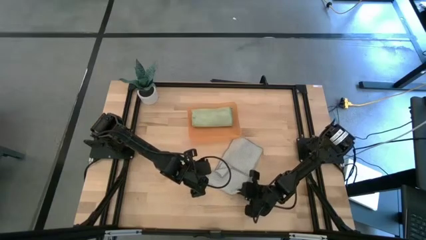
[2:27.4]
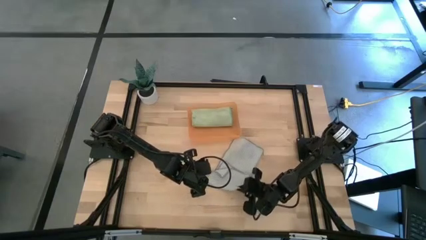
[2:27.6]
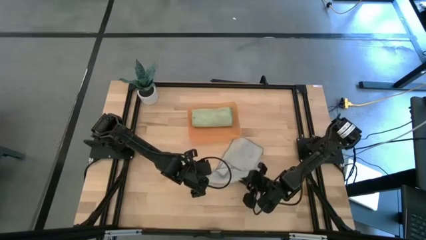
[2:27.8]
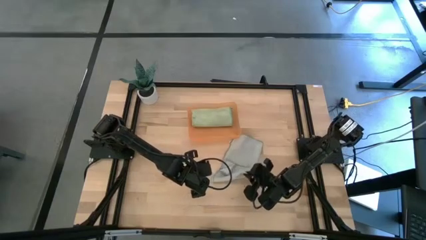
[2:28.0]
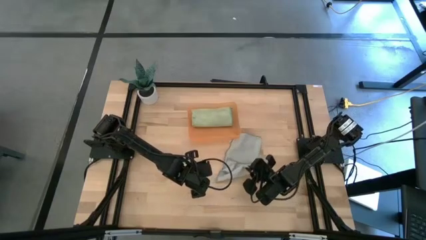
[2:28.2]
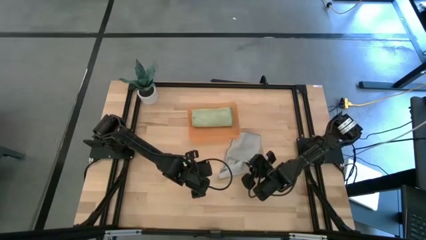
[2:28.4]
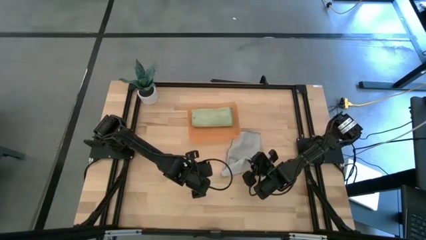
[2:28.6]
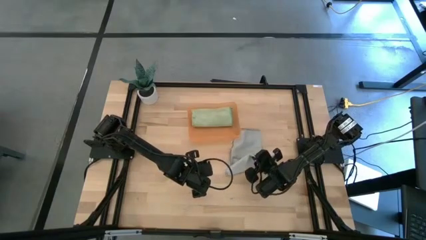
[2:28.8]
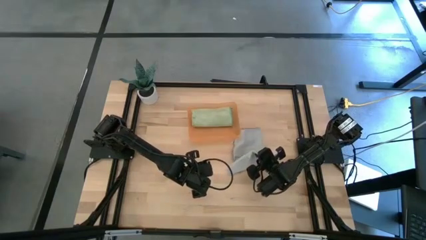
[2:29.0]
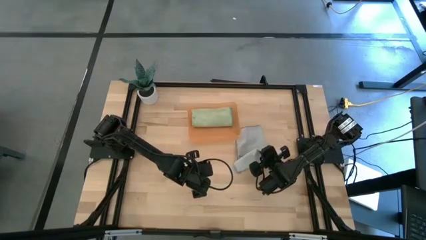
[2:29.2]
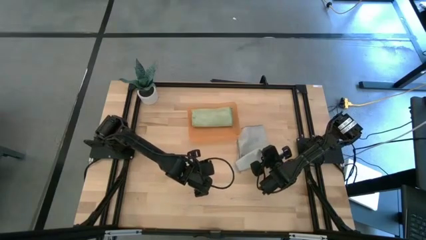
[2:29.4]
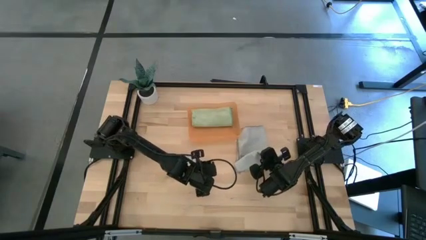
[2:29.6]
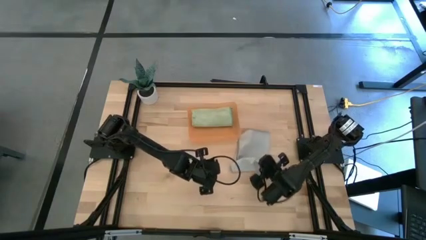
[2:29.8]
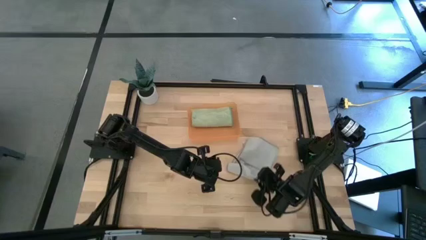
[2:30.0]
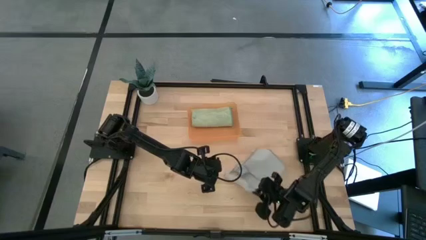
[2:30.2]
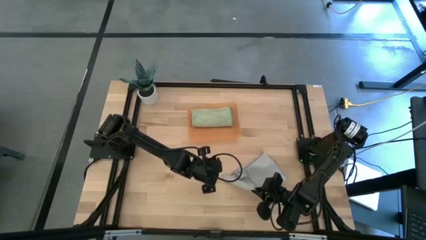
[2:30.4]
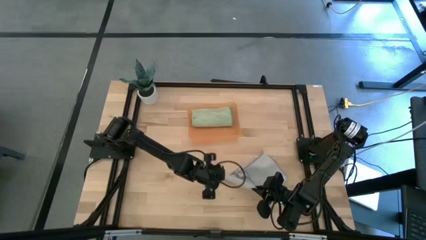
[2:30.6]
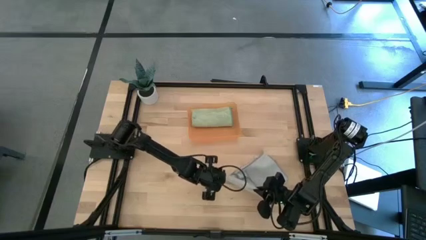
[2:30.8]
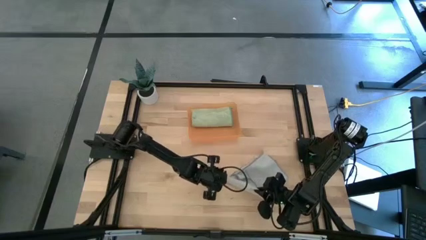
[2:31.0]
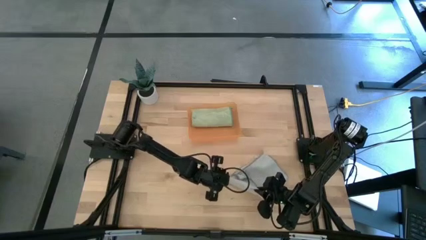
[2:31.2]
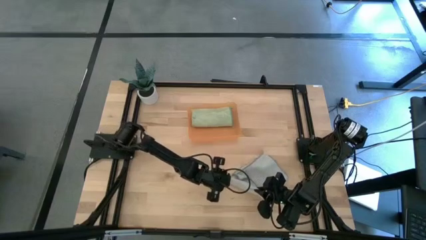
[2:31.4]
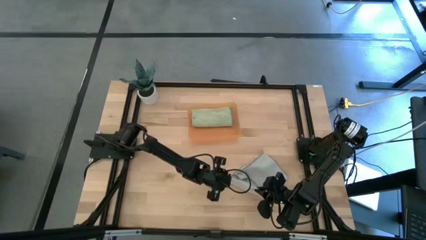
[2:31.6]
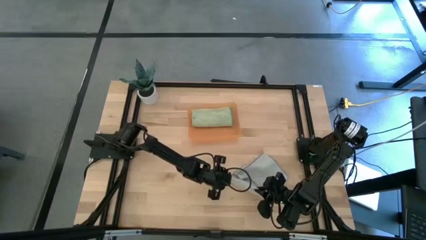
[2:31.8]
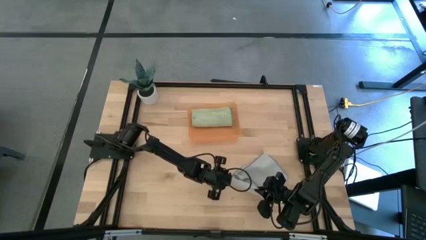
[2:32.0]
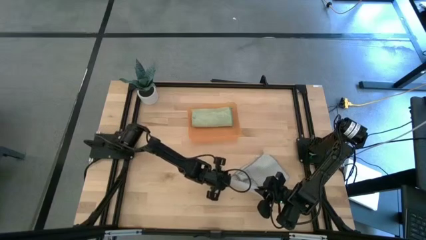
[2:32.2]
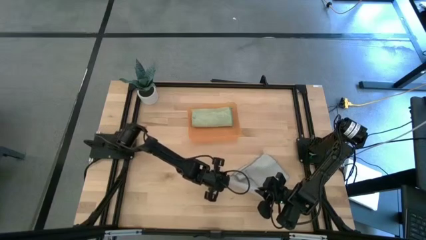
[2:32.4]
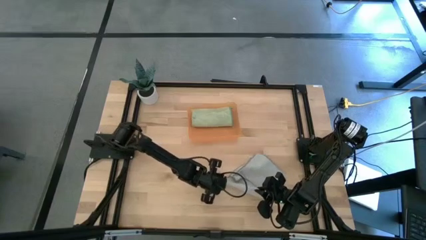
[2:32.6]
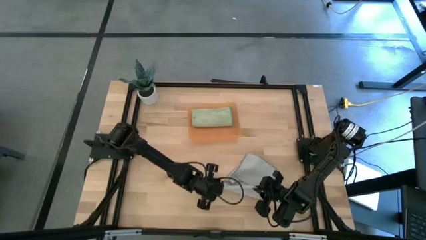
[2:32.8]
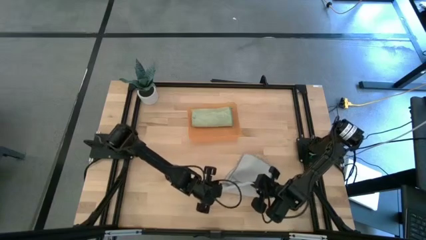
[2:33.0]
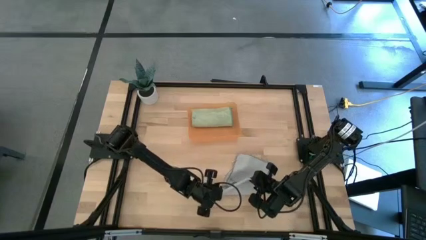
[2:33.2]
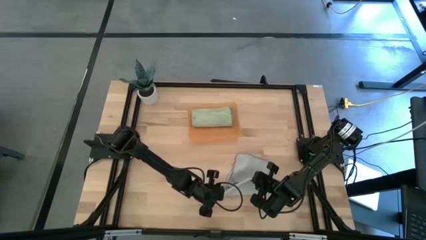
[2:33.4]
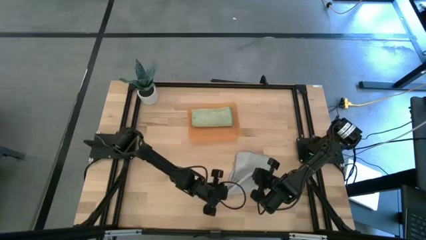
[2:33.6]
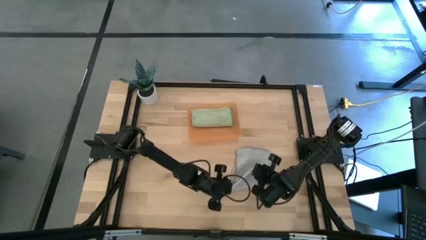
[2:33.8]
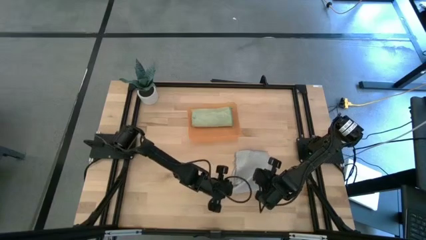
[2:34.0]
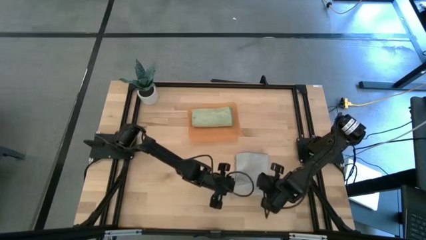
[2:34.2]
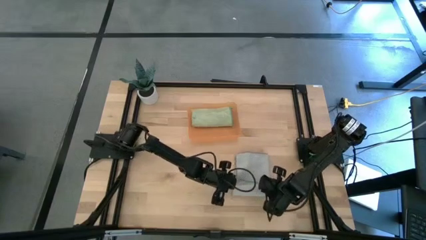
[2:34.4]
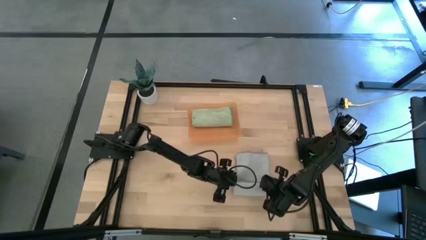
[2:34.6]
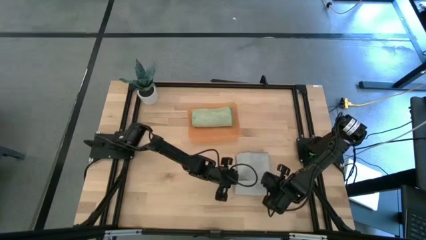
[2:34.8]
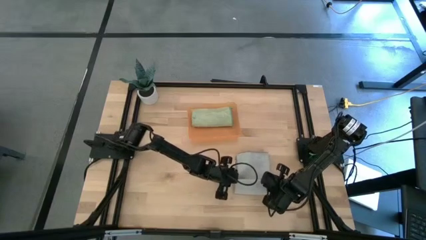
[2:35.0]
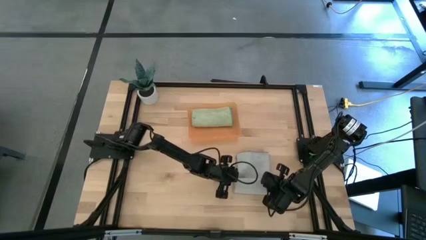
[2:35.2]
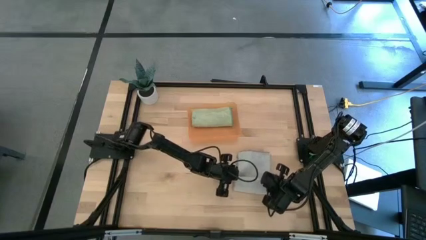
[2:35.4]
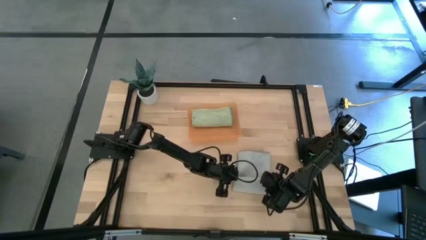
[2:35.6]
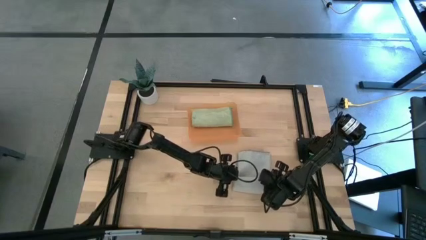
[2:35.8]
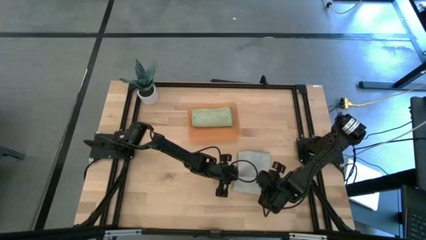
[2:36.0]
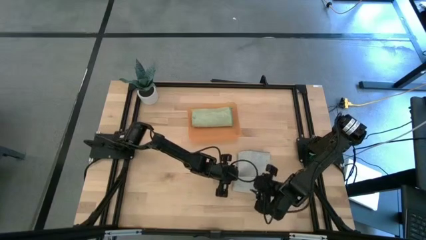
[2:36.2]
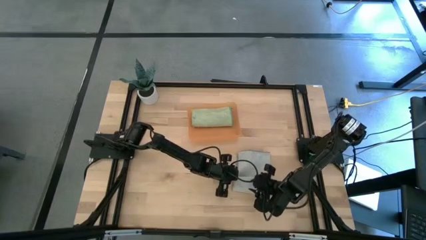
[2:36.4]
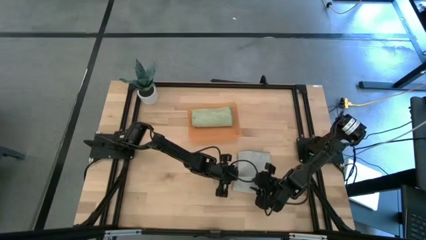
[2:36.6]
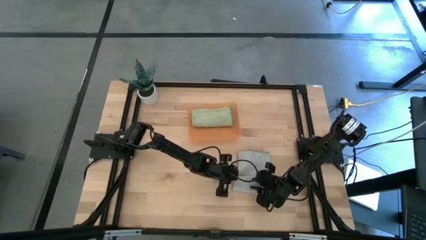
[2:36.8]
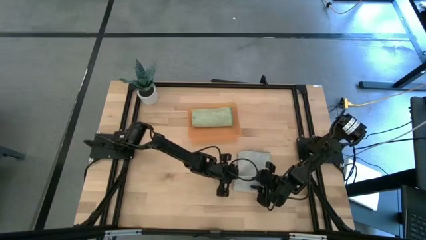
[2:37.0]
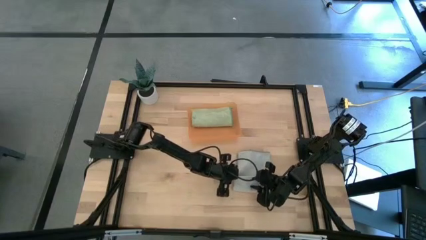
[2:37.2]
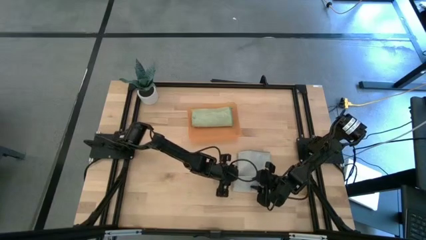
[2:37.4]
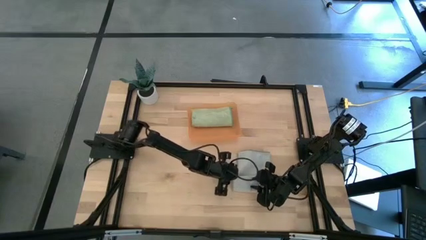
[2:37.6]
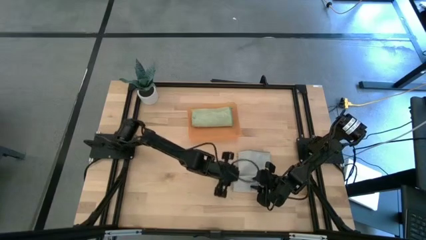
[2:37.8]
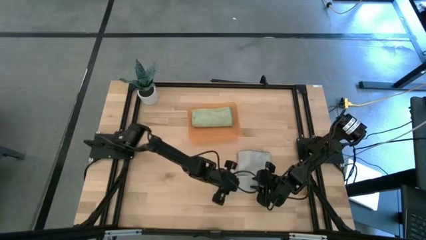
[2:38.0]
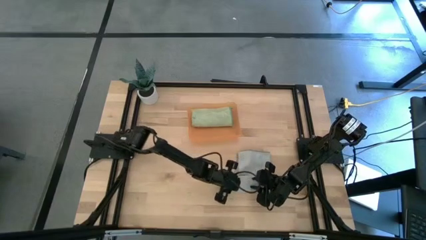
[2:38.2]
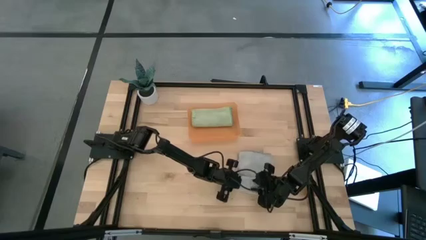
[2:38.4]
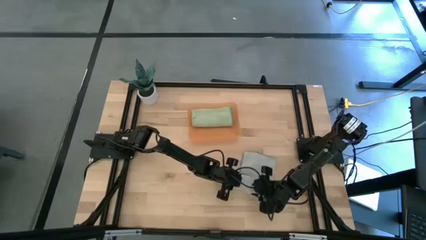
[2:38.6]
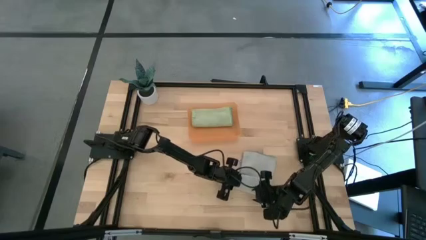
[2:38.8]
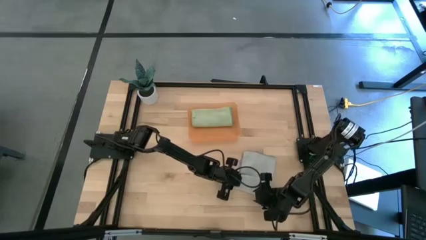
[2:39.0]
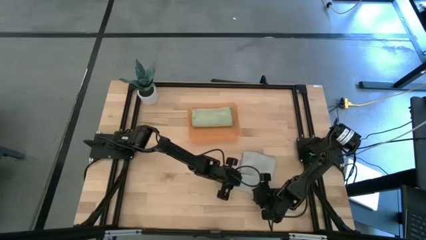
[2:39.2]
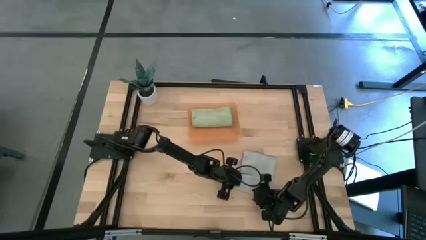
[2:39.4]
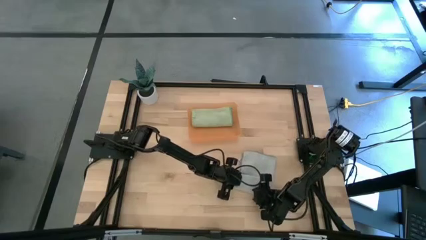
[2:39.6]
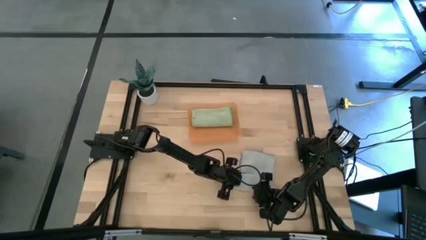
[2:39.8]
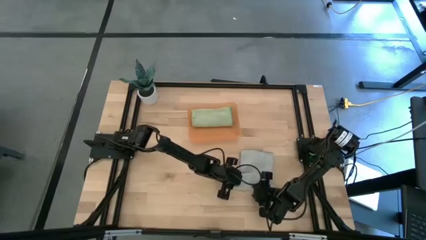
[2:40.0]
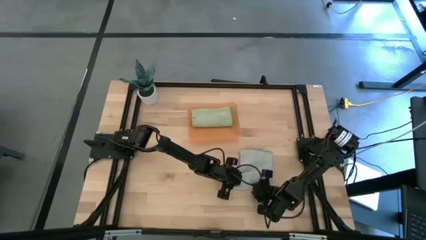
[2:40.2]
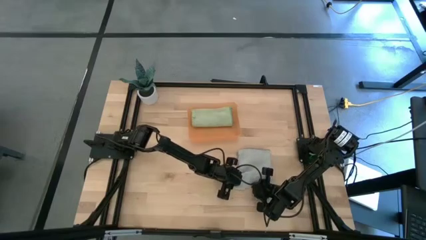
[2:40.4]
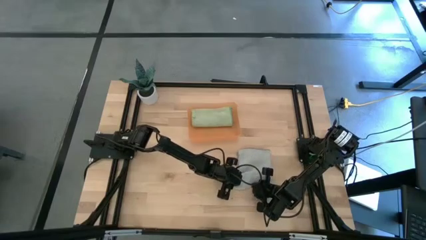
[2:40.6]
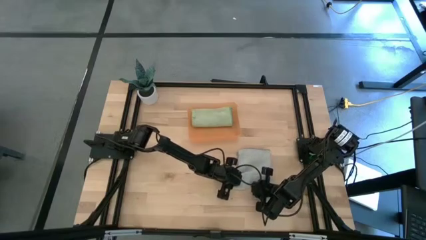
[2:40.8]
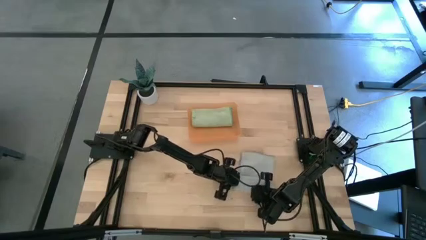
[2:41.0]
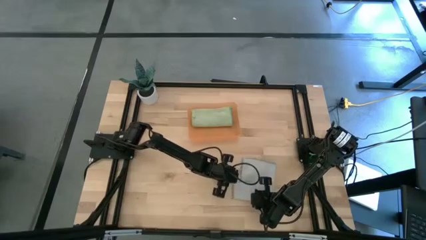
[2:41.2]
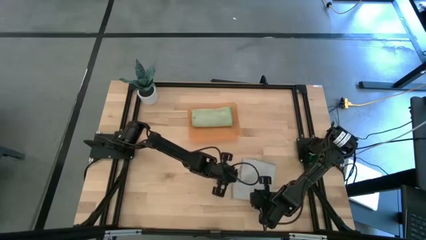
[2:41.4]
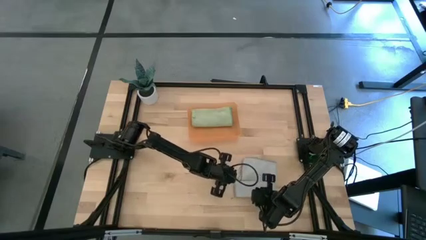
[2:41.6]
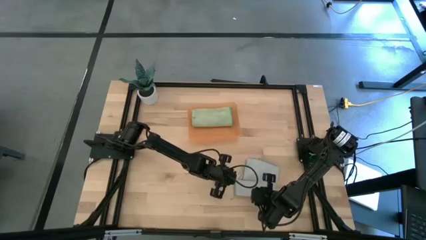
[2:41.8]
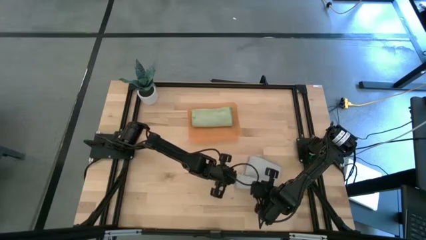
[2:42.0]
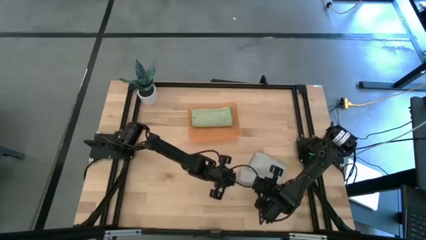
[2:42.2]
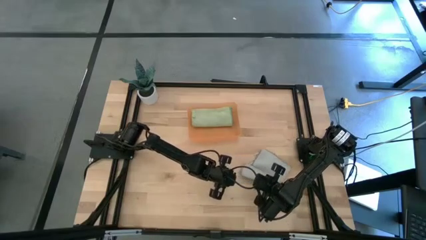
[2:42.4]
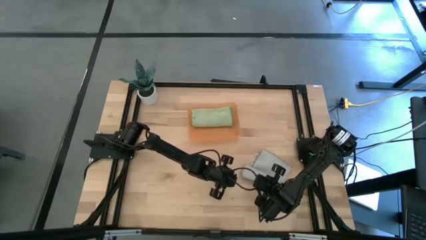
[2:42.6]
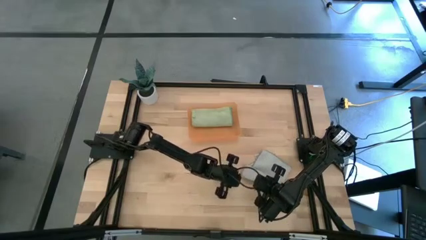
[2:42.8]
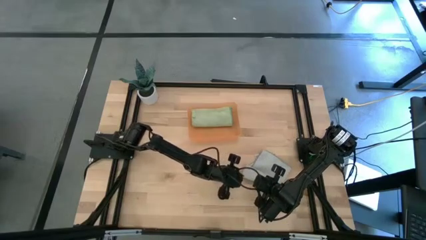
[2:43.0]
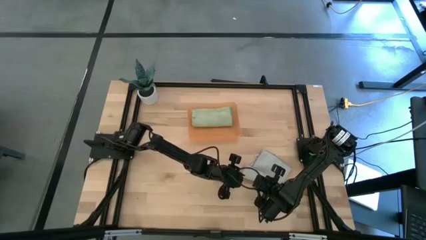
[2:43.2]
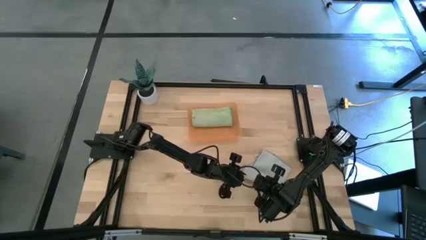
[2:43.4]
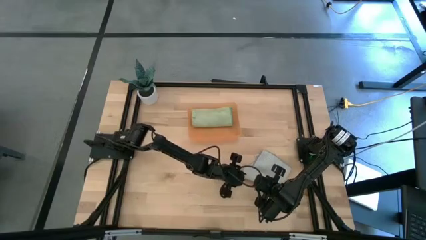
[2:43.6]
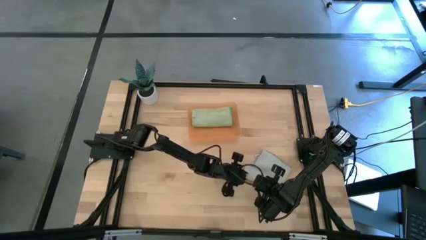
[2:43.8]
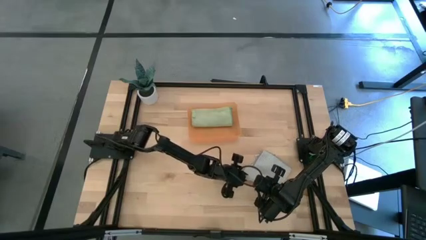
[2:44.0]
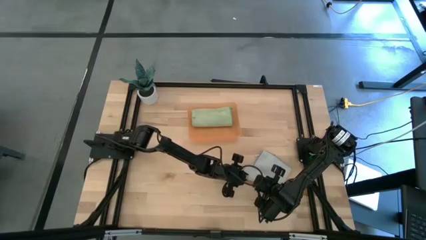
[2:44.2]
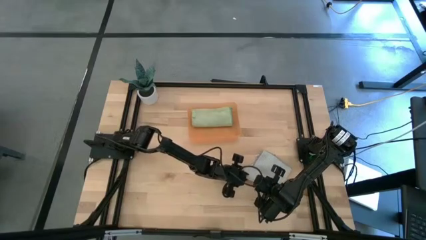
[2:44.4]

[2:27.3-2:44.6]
Task: Roll microfiber towels into tight, uniform cylinder then place into a basket
Roll the gray microfiber towel
